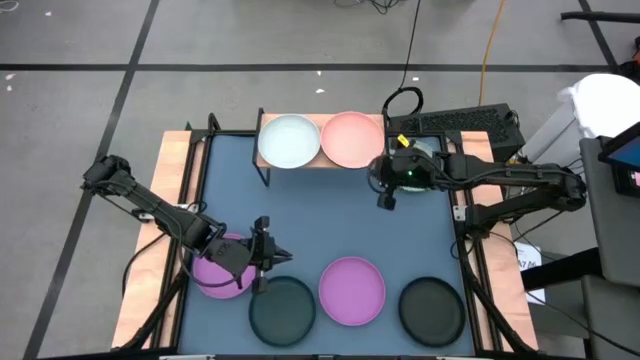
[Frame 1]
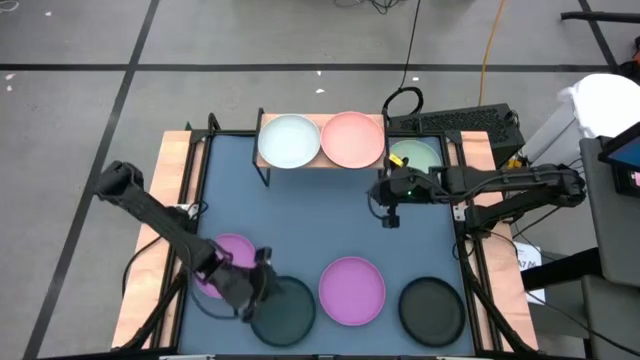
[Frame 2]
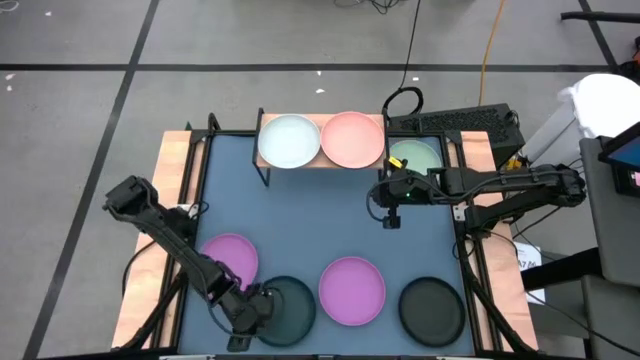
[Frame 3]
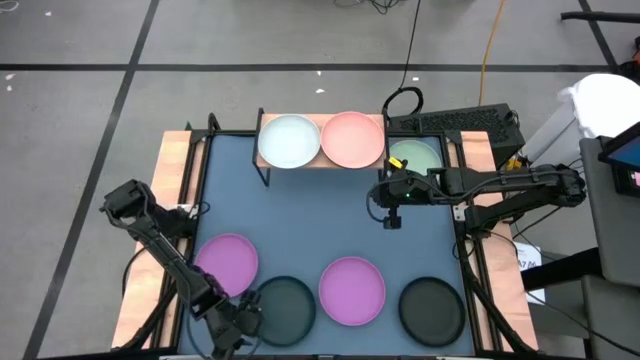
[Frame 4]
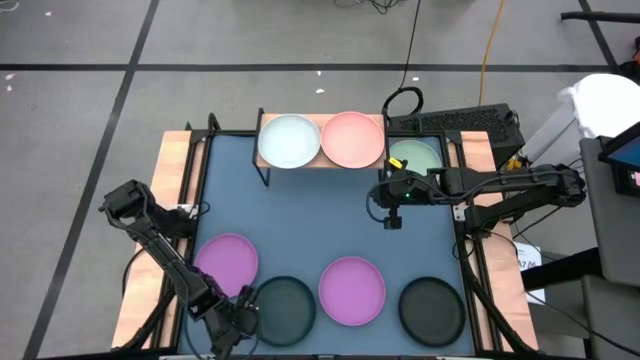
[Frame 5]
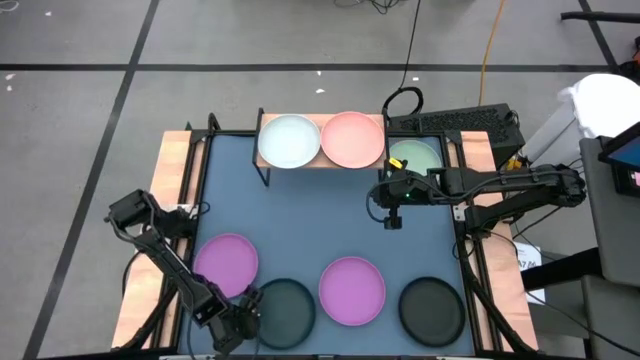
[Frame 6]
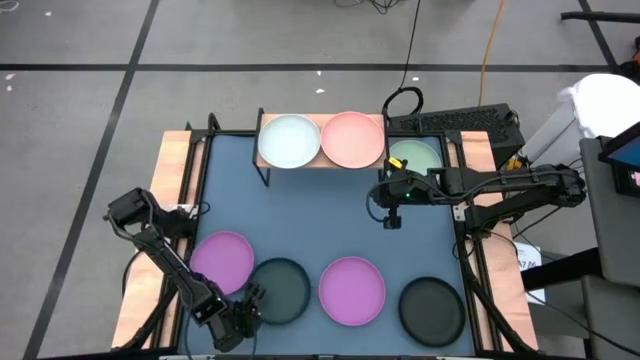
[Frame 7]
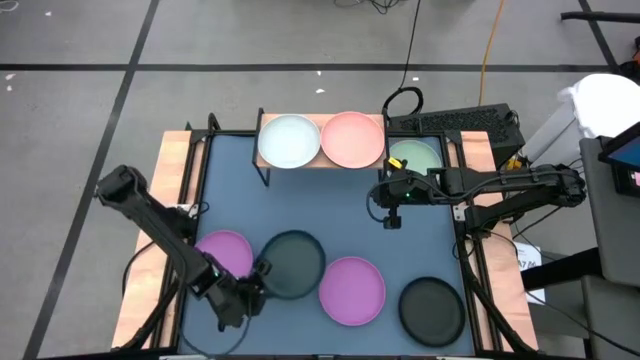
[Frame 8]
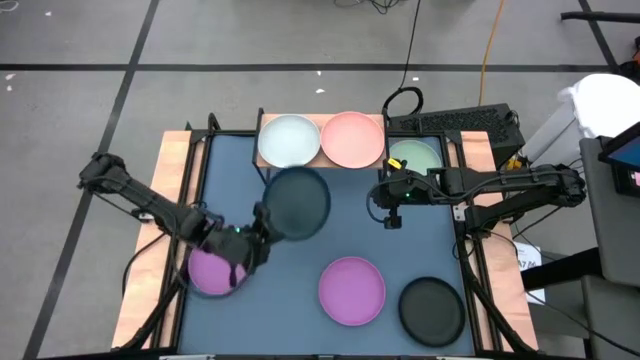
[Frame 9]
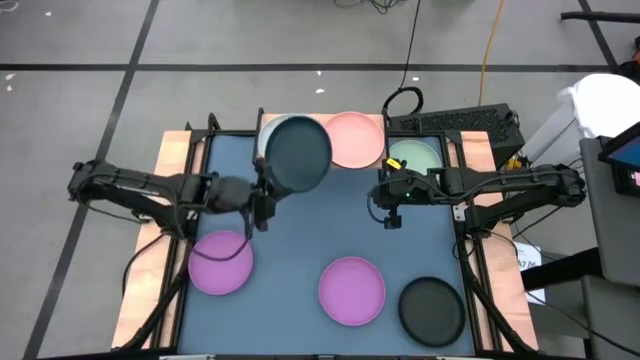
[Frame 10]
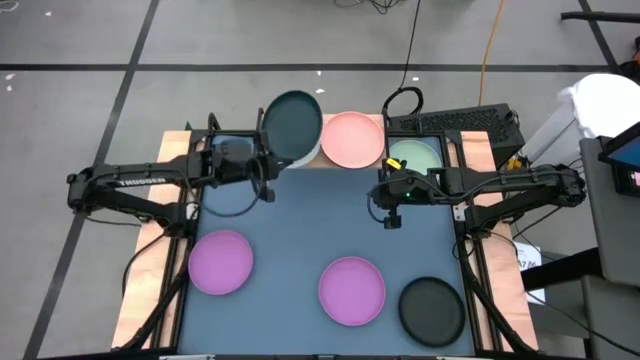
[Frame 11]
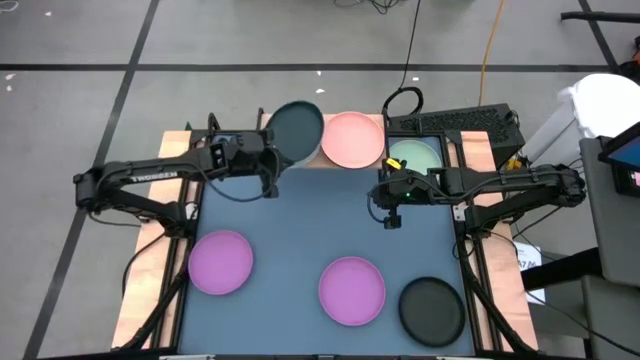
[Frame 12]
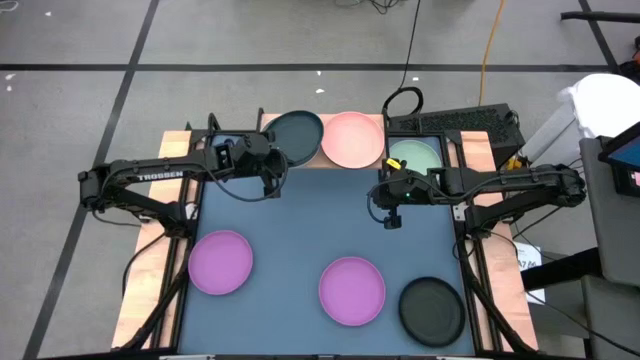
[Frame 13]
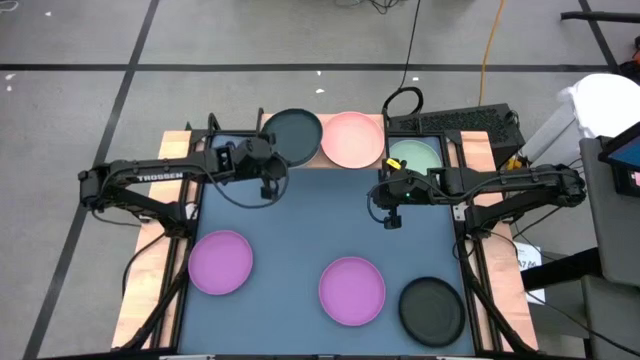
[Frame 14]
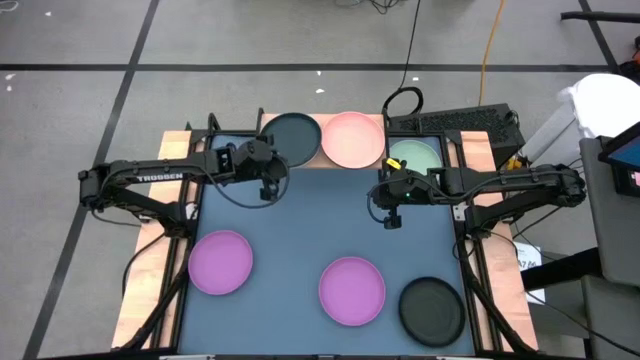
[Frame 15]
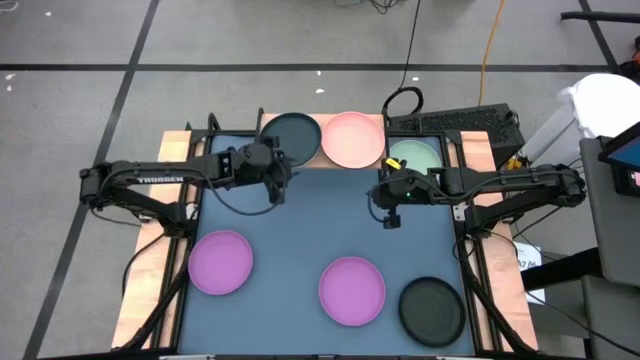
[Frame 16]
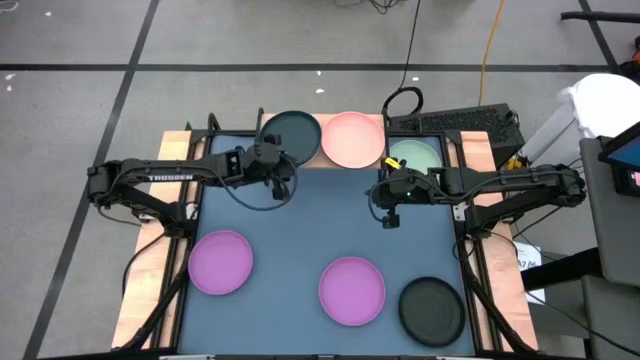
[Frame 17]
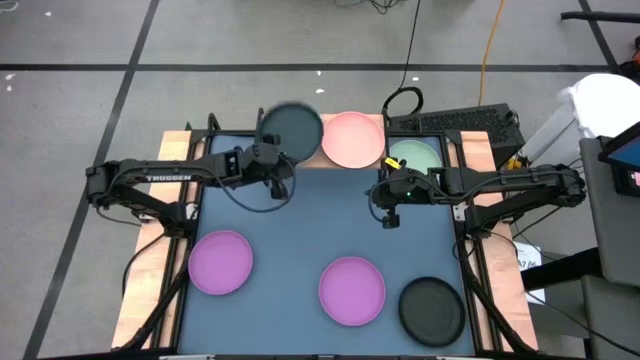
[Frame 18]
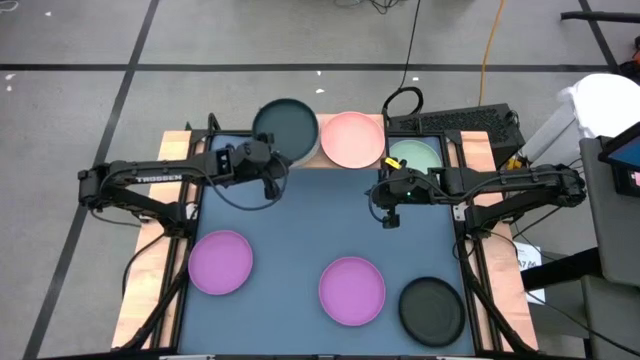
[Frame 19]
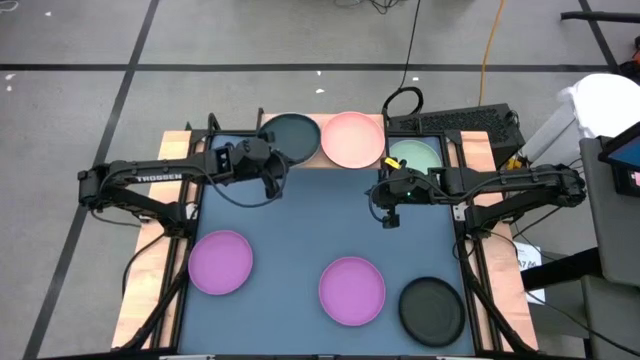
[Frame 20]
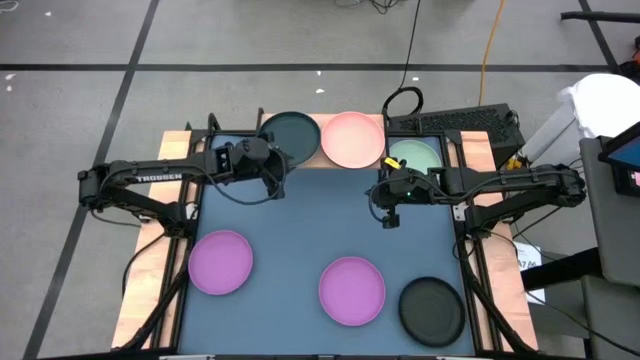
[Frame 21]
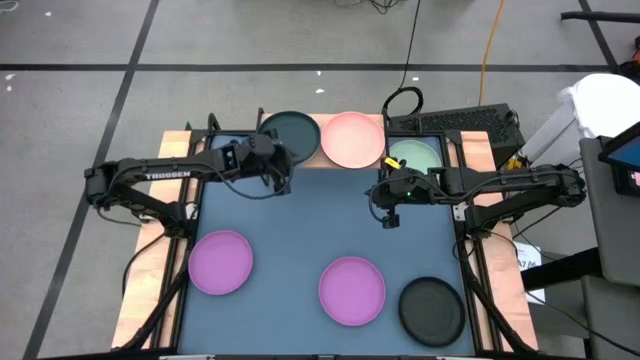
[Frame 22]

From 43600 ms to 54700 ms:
Task: Place and stack plates onto a shelf
Stack the dark green plate on top of the blue plate on the shelf

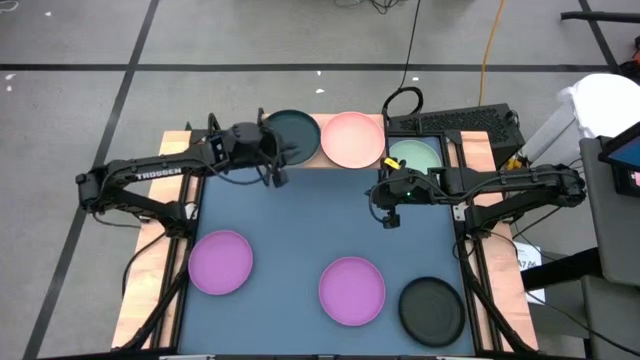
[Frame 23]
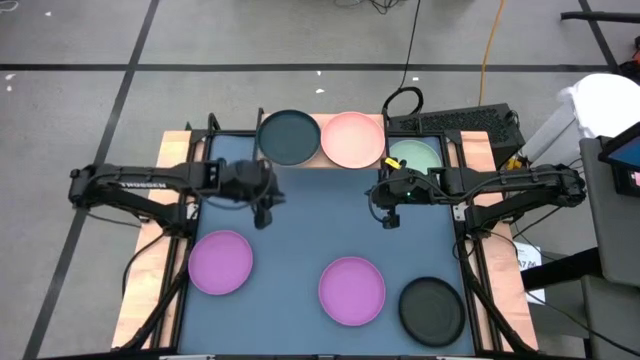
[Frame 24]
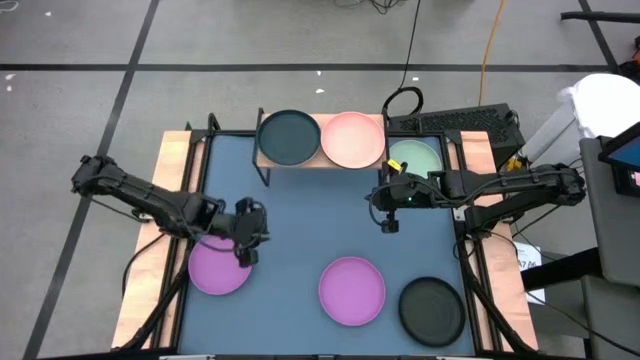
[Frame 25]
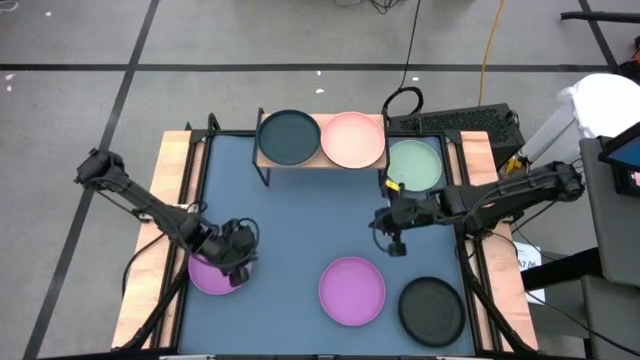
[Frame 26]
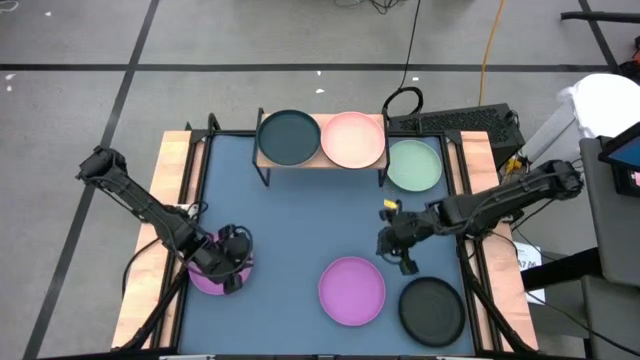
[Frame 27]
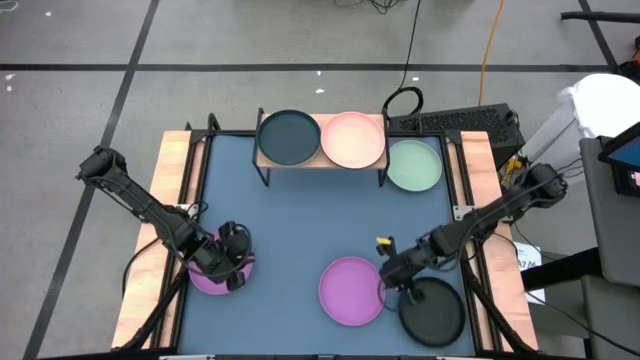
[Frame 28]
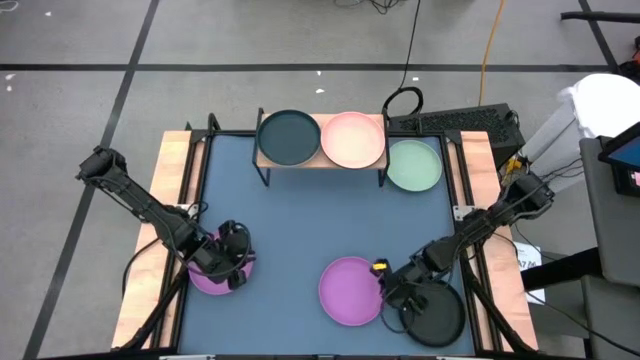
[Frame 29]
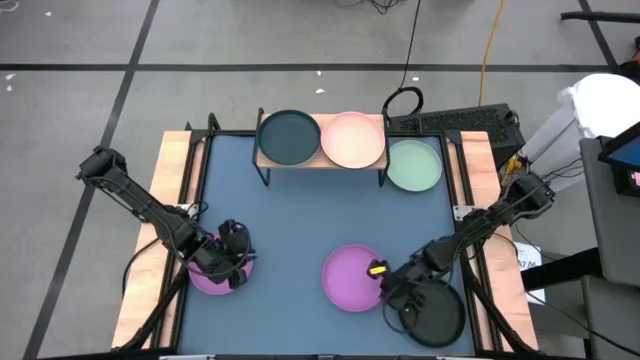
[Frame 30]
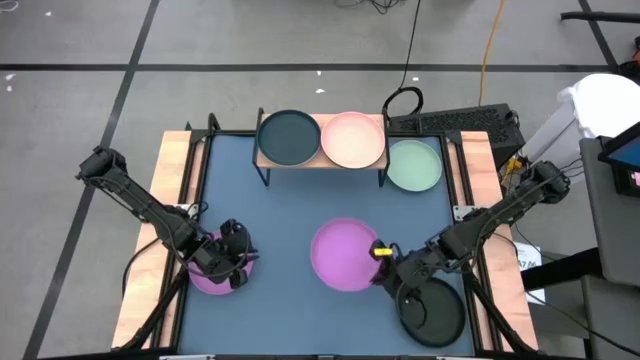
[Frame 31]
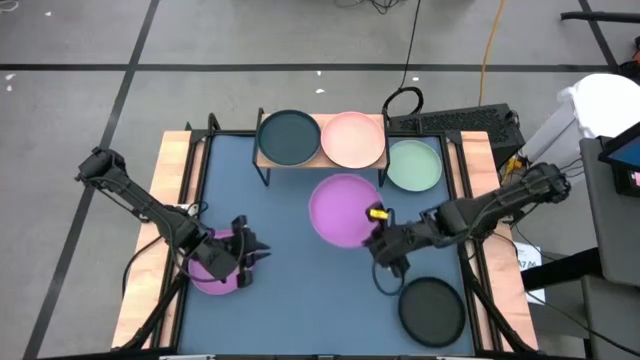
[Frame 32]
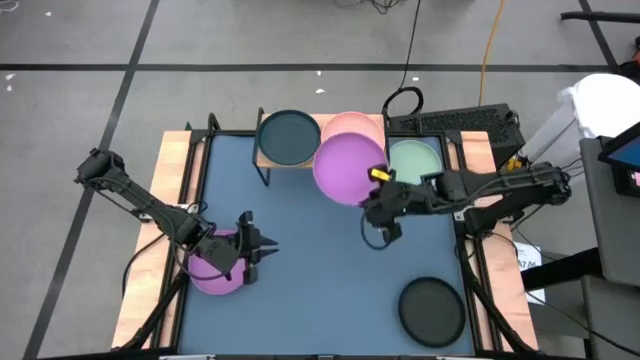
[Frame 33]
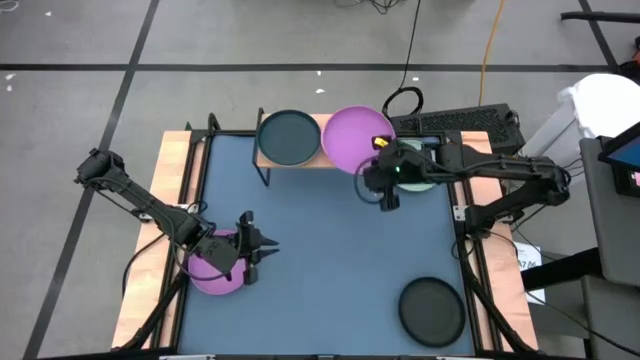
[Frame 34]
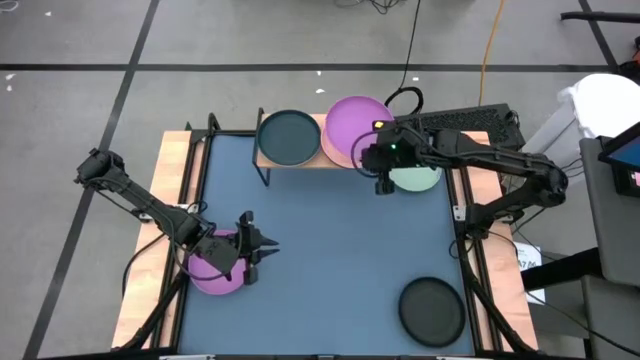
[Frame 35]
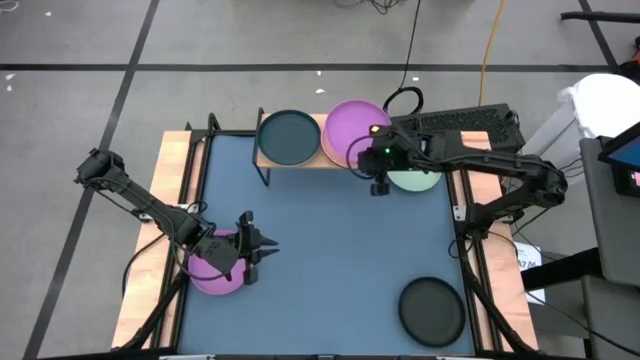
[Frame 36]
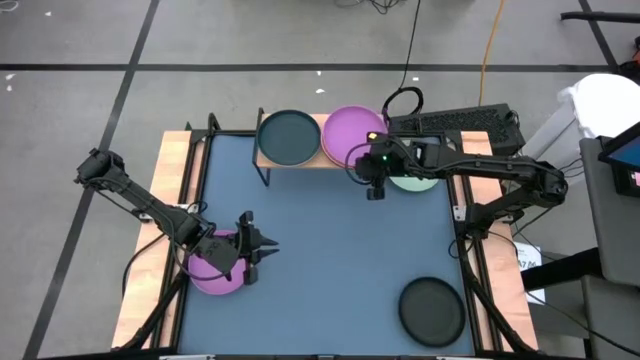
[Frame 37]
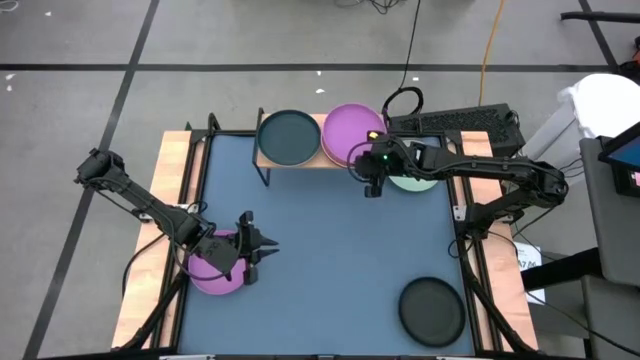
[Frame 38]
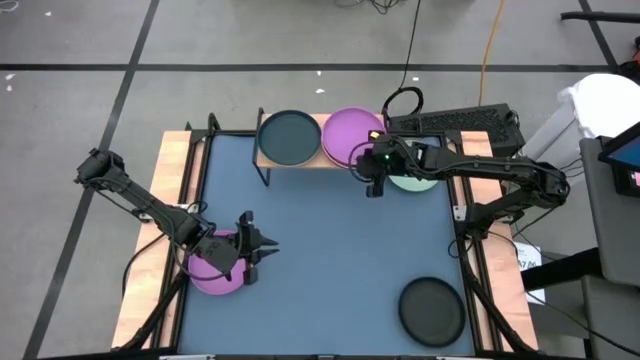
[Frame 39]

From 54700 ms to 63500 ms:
Stack the right purple plate on top of the orange plate on the shelf
